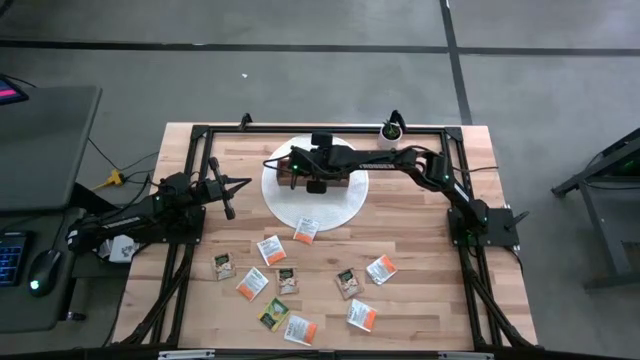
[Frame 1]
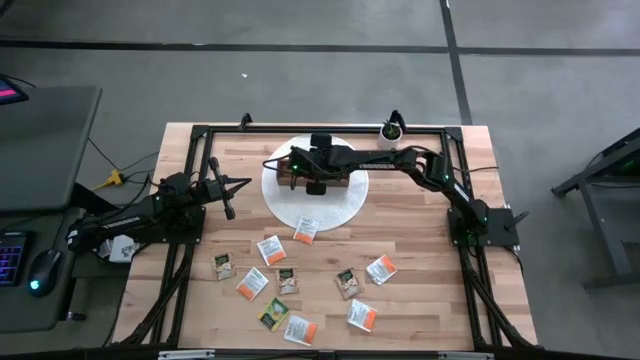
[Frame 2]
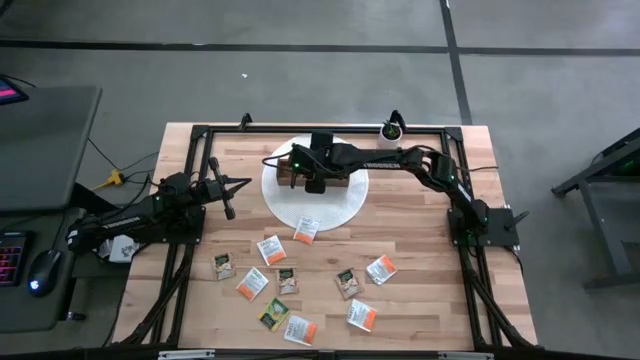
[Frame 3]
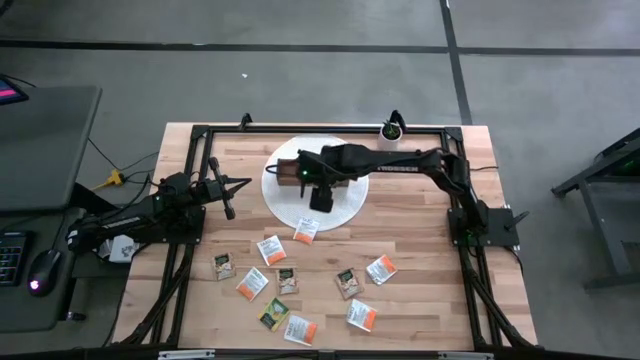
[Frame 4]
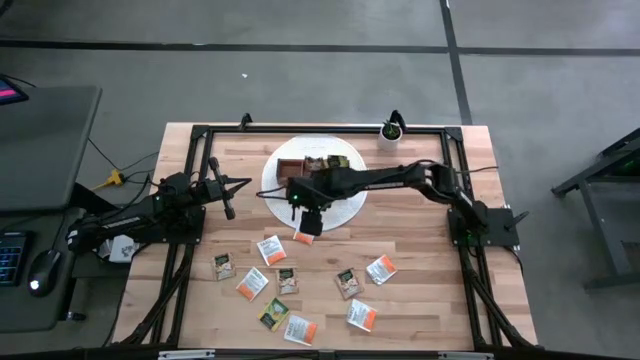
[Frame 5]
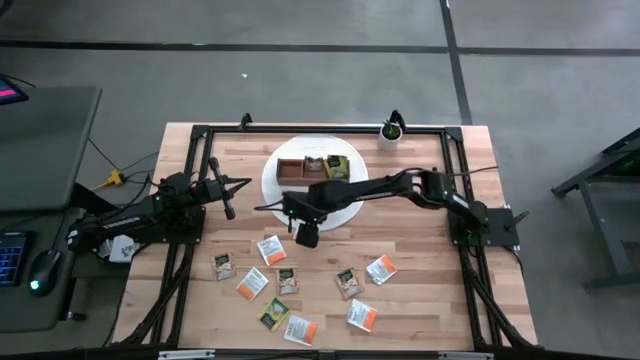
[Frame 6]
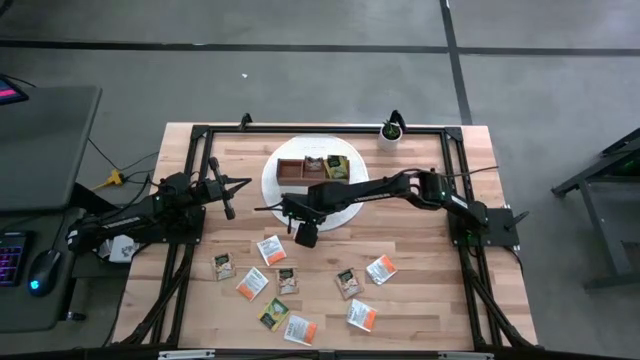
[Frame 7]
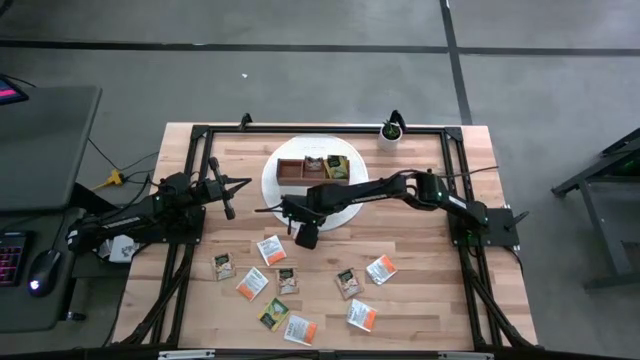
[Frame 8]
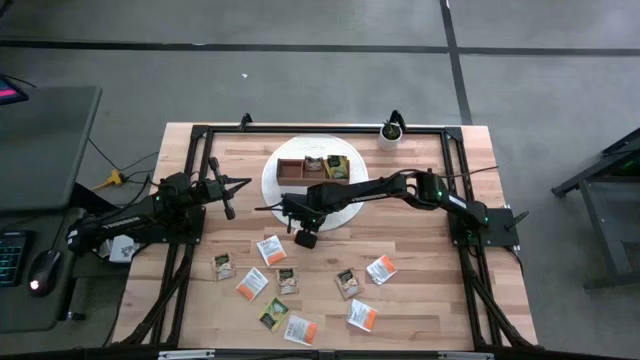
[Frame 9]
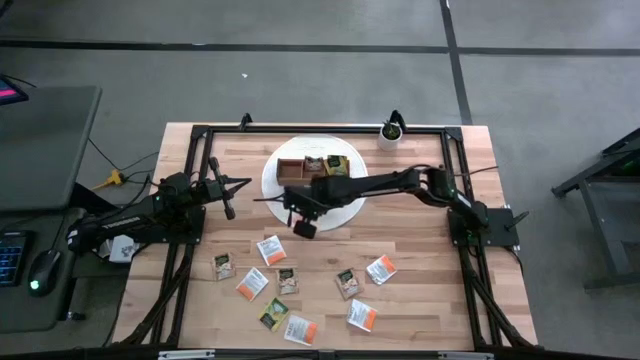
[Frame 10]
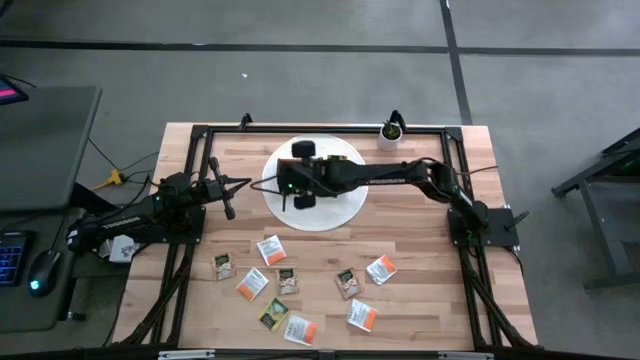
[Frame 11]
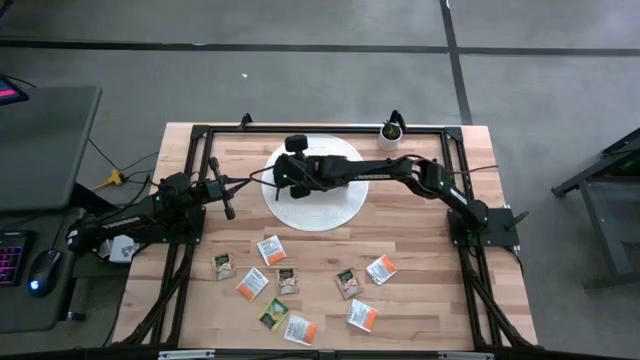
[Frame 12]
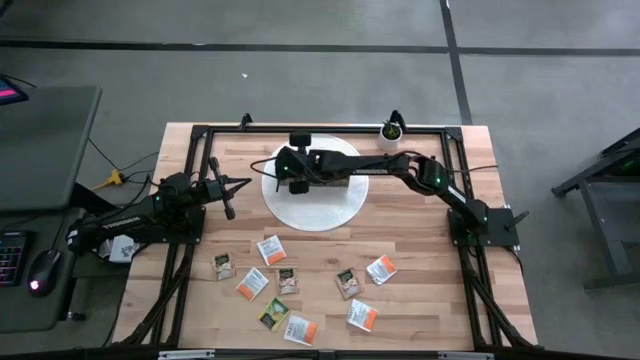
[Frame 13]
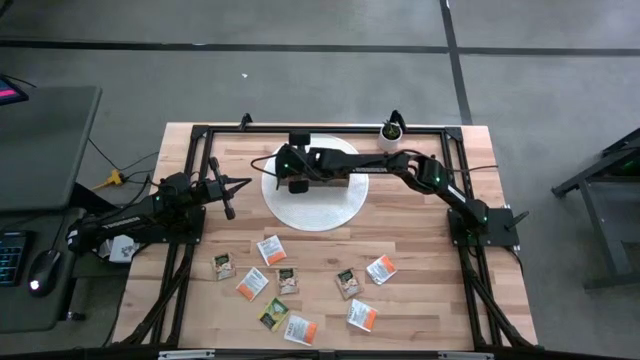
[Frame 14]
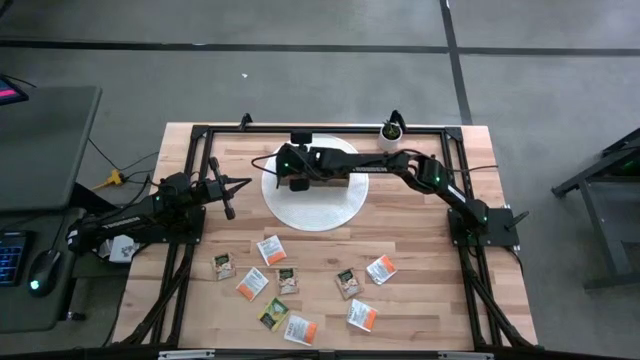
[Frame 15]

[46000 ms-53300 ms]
Task: Pick & Place Tea
Put the white tea bag into the left section of the wooden organizer

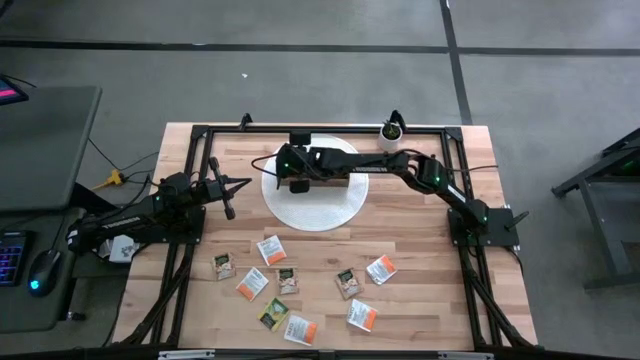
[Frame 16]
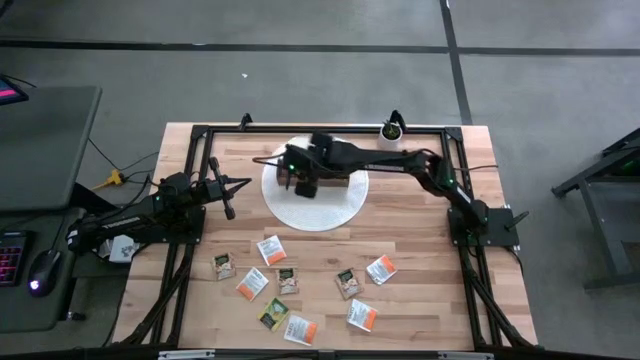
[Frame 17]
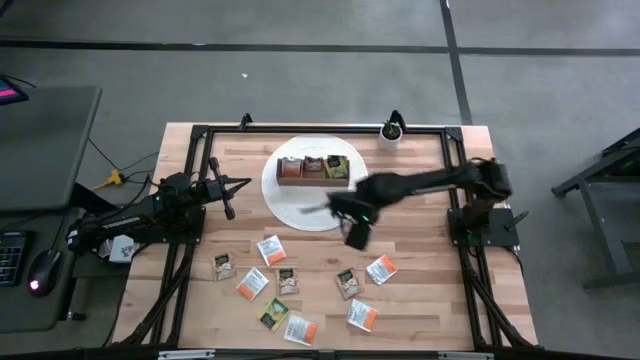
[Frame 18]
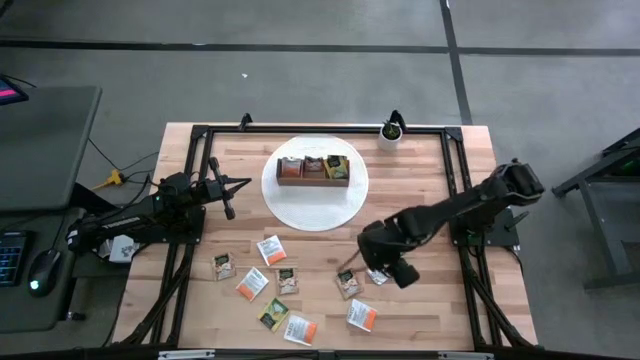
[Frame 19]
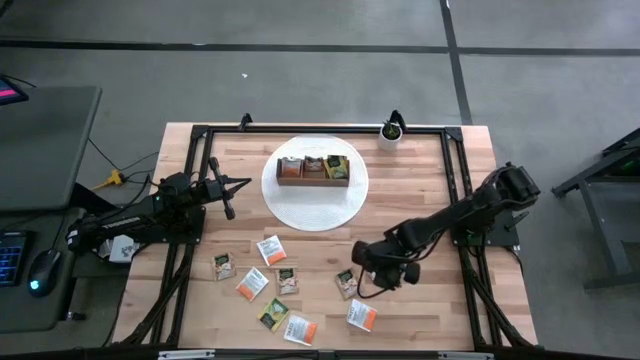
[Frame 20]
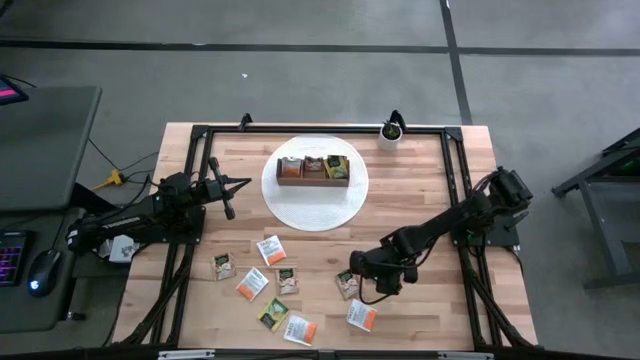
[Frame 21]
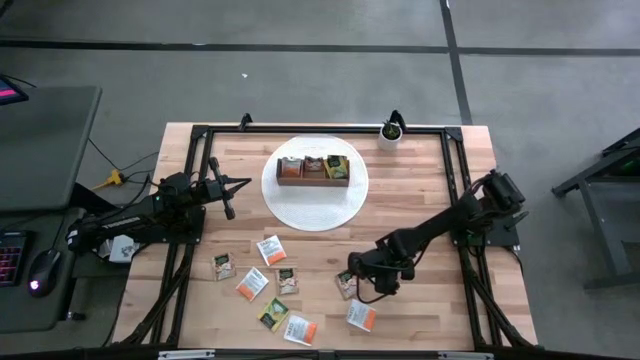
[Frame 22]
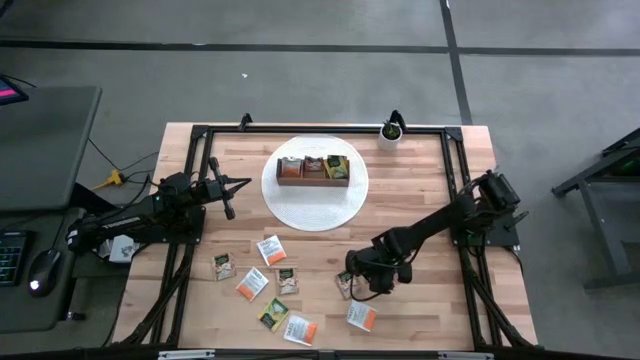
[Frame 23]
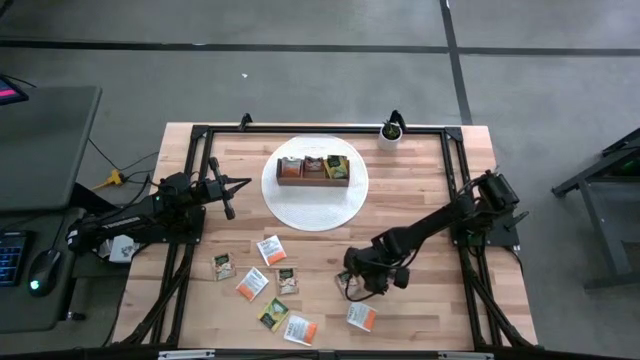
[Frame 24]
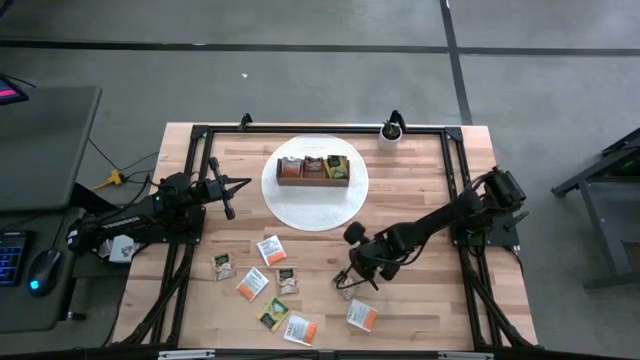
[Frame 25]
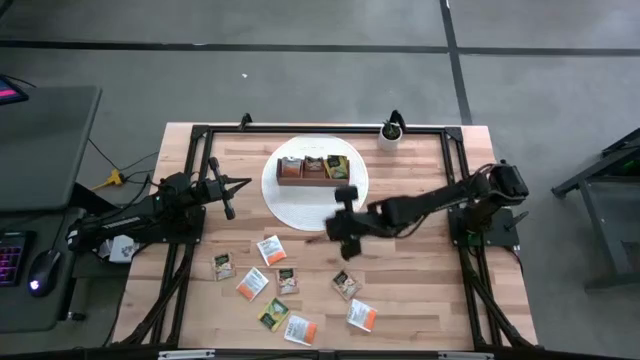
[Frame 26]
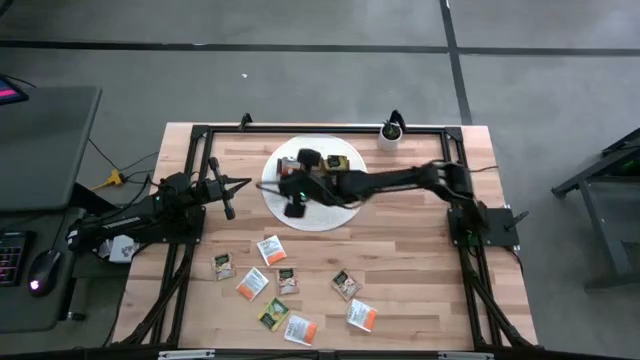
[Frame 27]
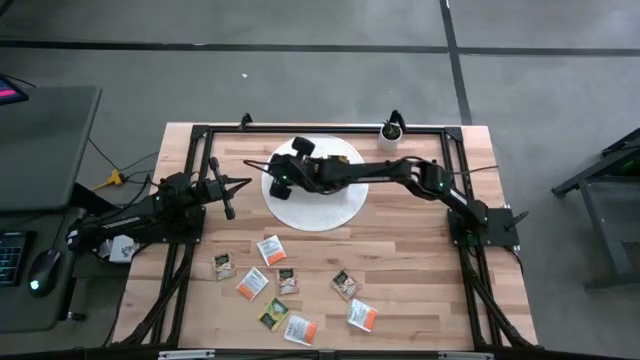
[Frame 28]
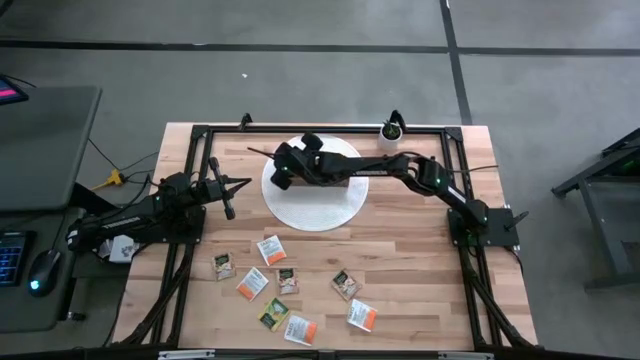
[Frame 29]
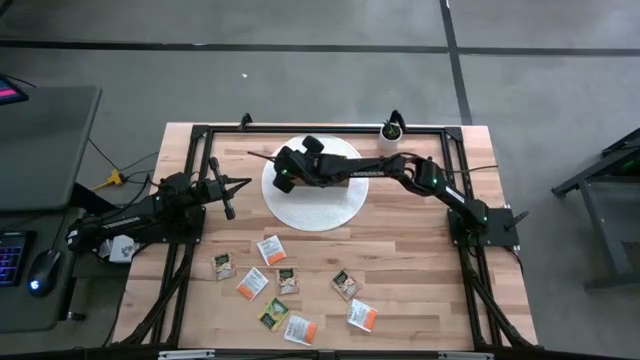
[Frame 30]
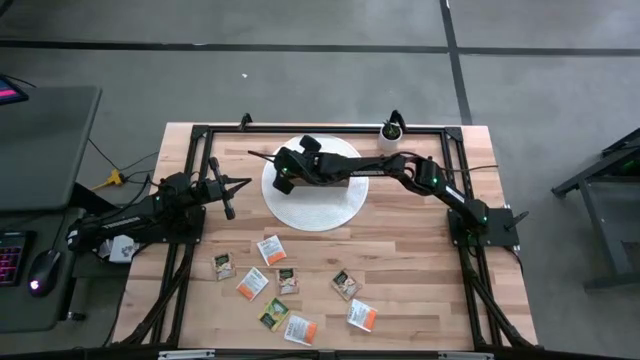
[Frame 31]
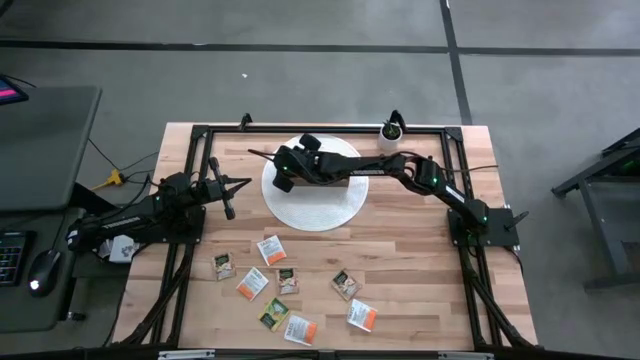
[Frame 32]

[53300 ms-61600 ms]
Put the white tea bag into the left section of the wooden organizer

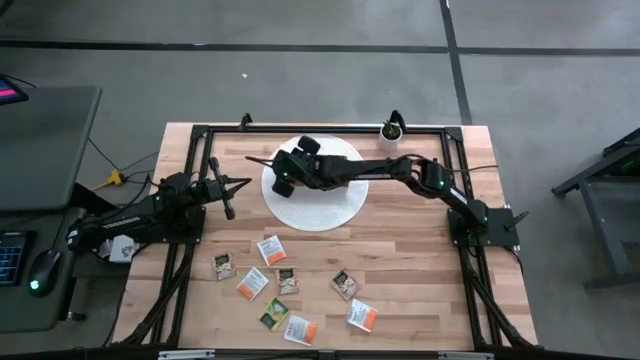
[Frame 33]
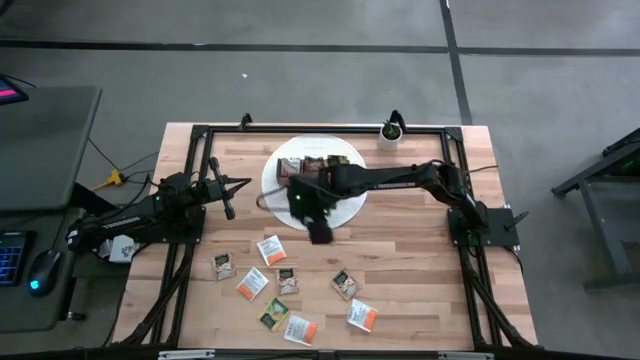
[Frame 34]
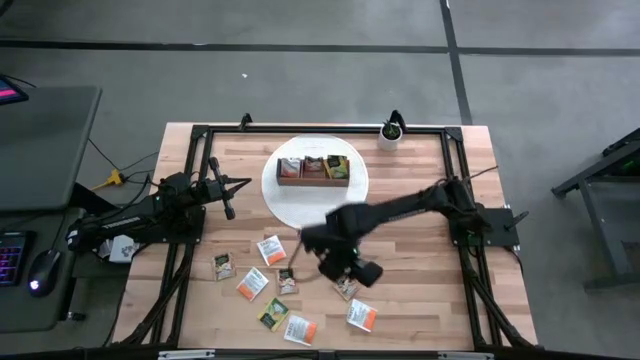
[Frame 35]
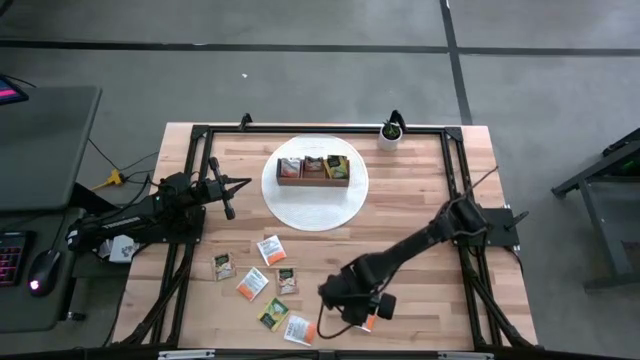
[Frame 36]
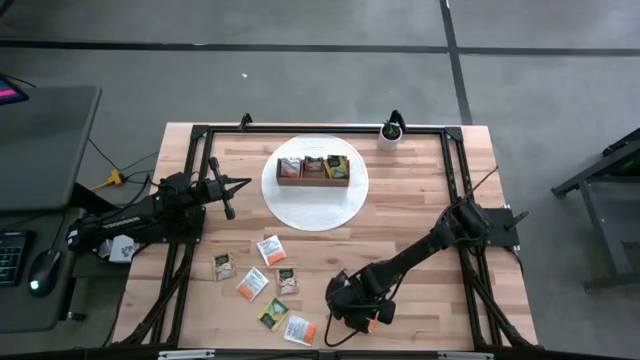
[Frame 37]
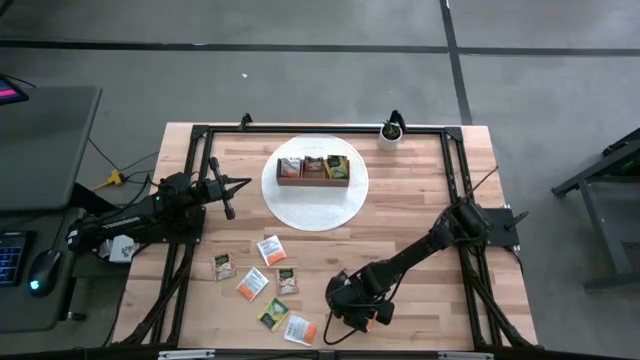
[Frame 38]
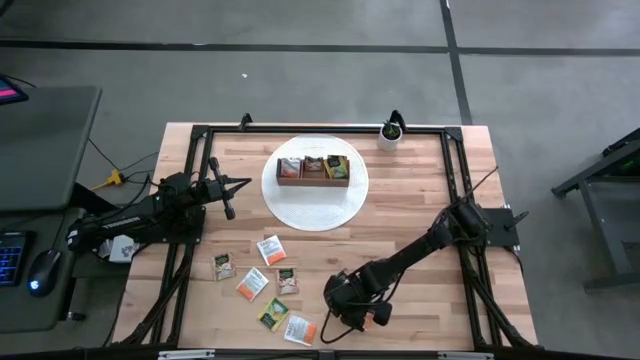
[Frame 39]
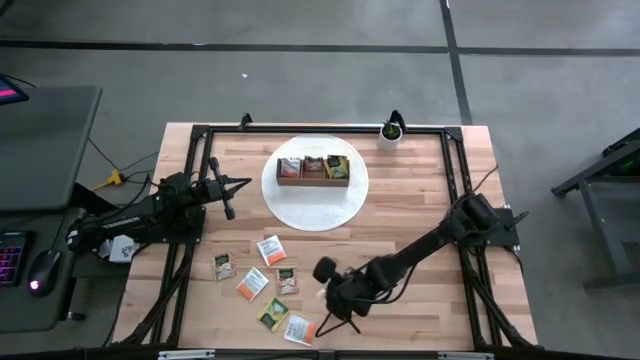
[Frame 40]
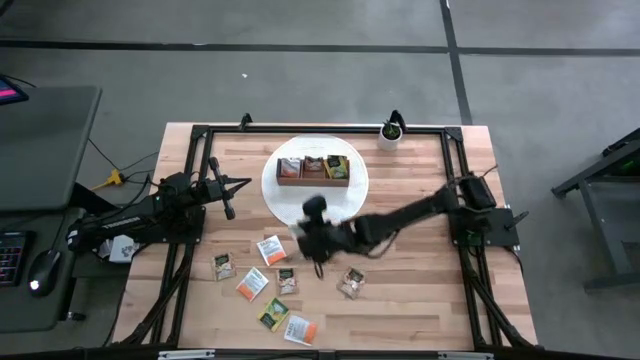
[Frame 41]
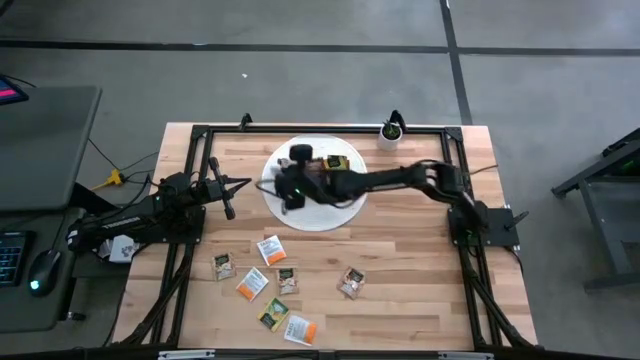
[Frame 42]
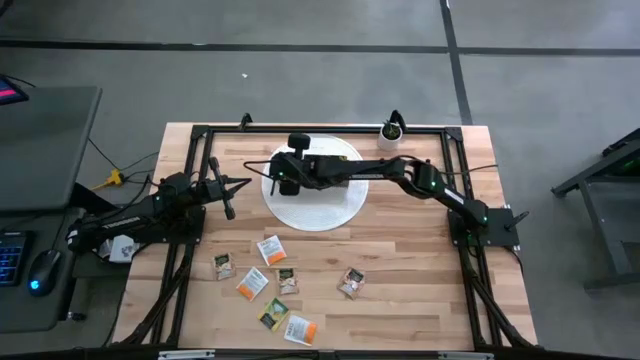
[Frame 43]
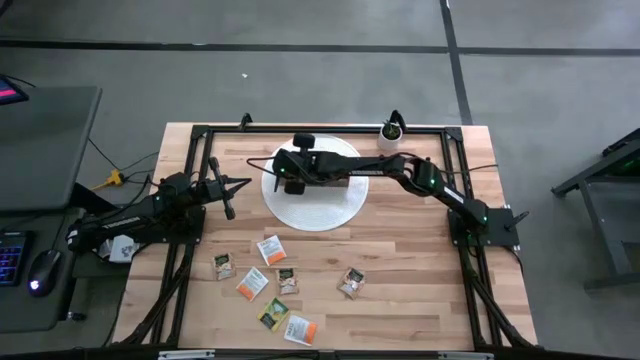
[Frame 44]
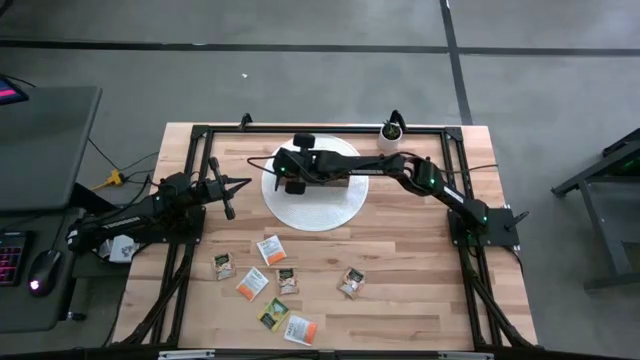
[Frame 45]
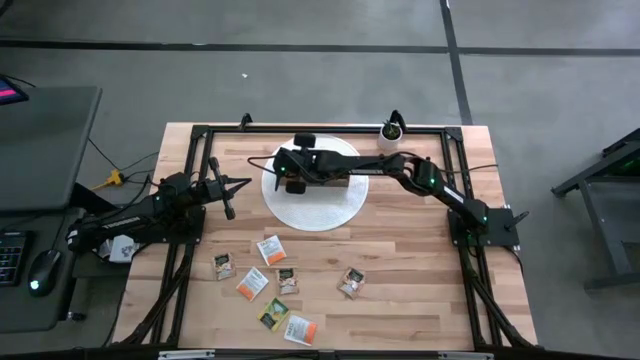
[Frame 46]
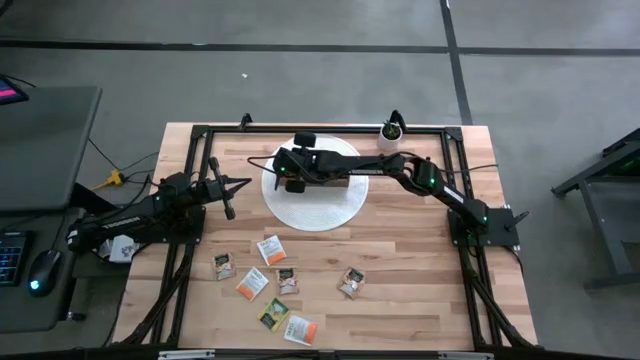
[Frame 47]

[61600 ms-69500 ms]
Put the white tea bag into the left section of the wooden organizer
